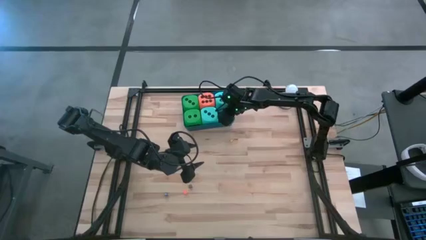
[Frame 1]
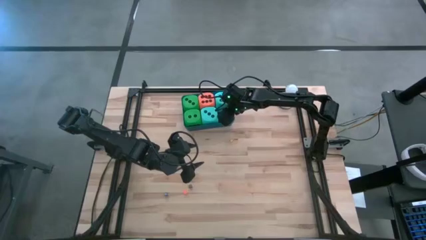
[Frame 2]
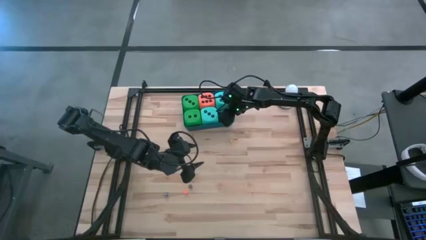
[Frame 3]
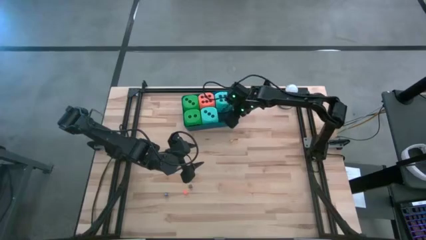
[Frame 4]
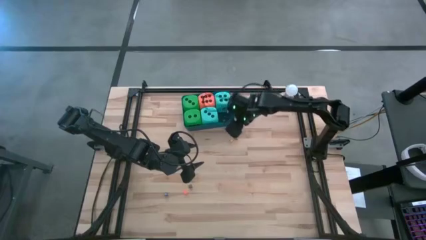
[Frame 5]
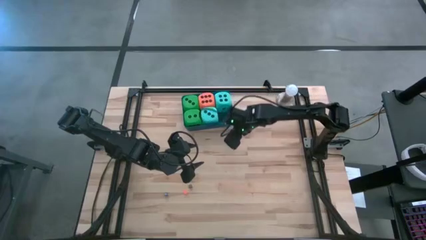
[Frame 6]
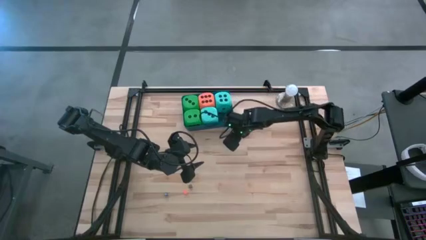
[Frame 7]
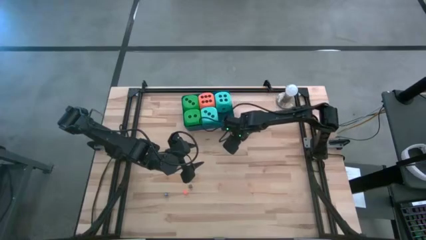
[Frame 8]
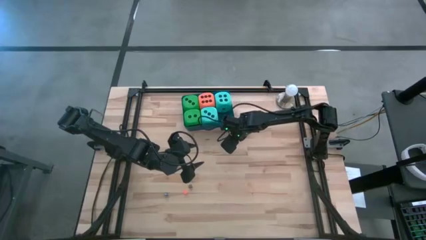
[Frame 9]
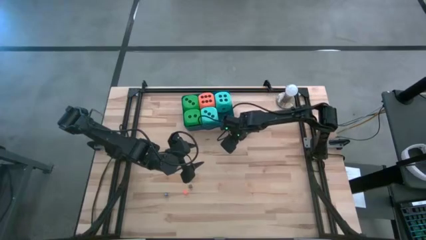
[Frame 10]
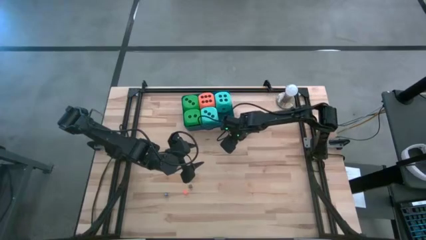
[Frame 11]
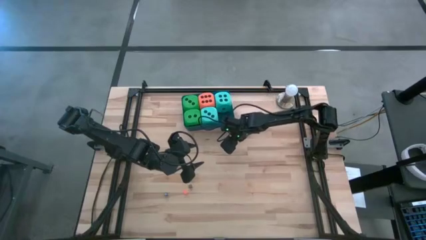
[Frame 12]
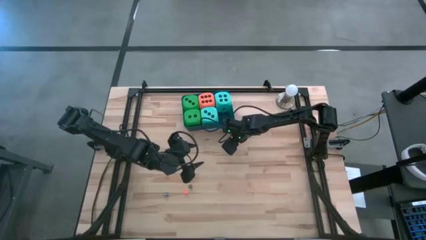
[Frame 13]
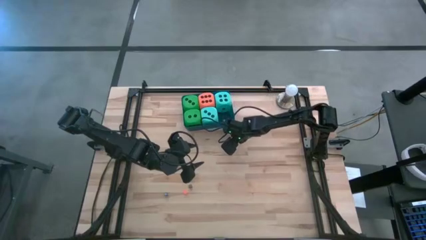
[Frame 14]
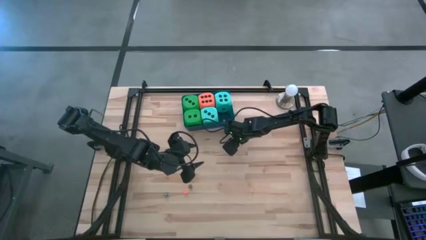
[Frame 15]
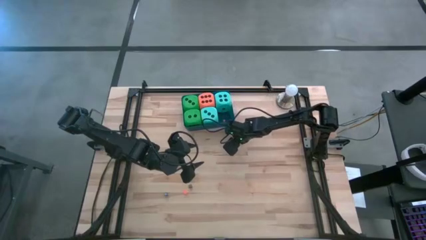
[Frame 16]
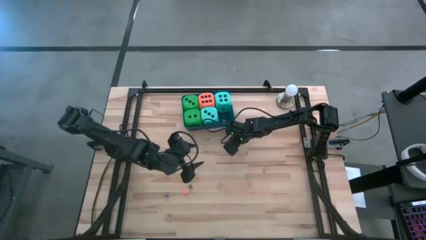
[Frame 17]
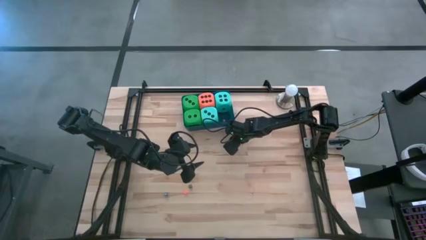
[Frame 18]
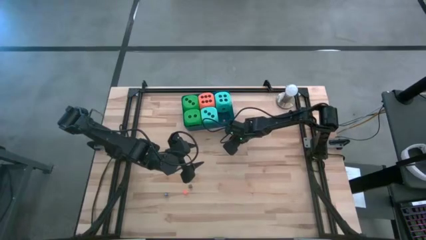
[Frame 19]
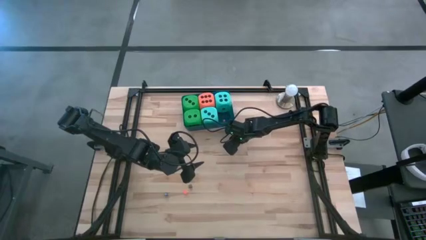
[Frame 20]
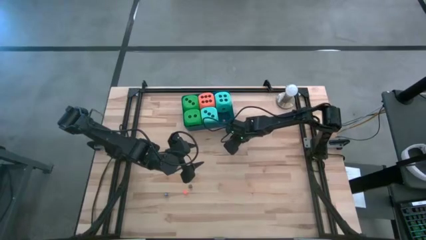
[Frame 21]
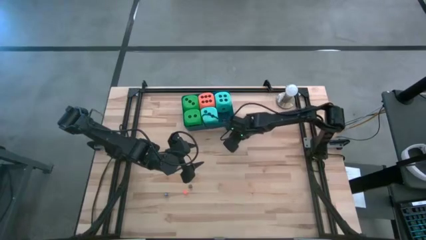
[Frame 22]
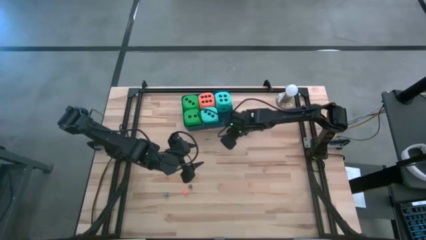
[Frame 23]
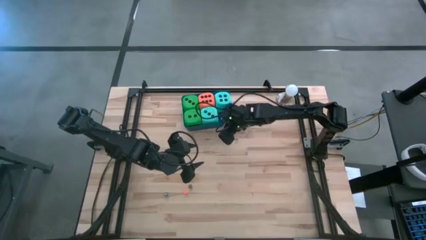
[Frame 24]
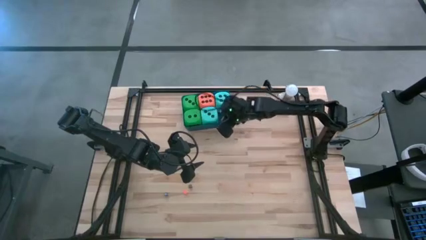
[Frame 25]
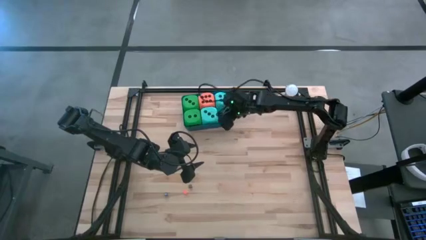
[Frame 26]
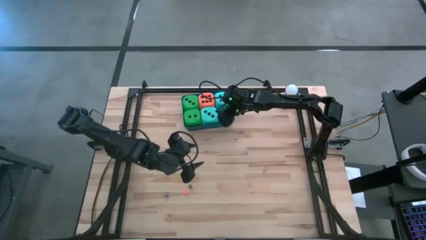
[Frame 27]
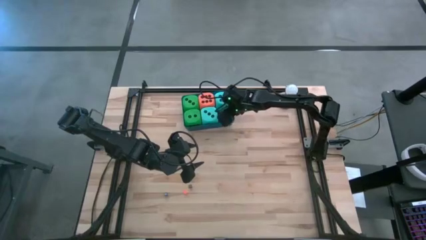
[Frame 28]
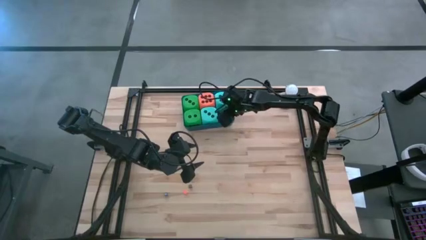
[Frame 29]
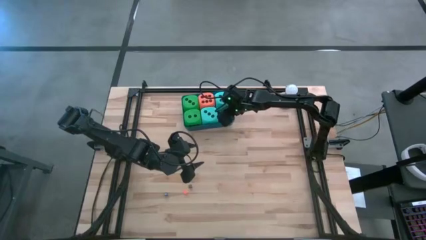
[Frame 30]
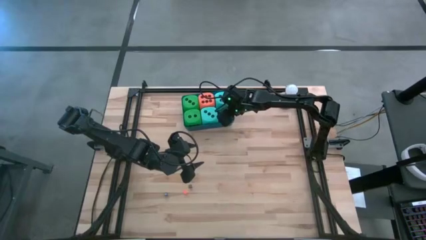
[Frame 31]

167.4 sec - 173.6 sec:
Task: Pick & Place Dice
Put the small yellow dice into the blue bin

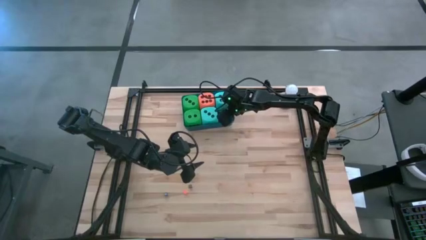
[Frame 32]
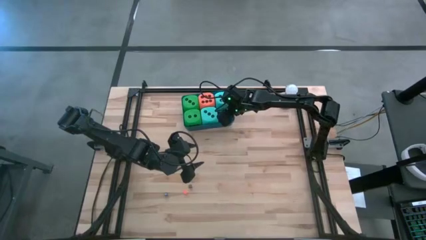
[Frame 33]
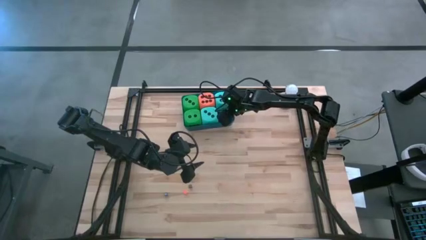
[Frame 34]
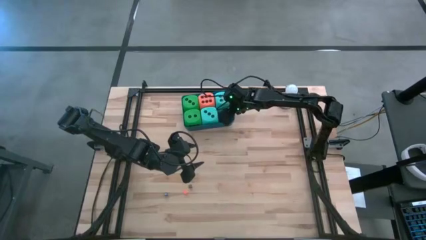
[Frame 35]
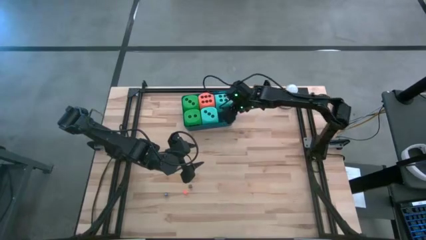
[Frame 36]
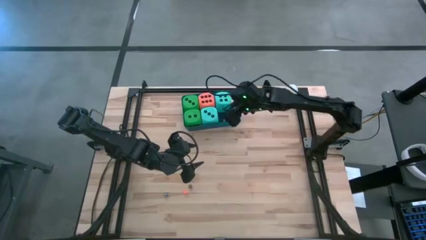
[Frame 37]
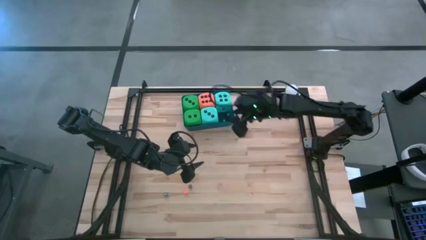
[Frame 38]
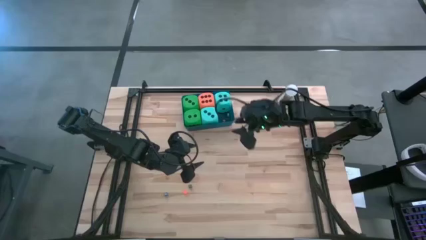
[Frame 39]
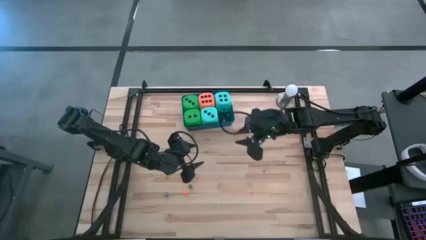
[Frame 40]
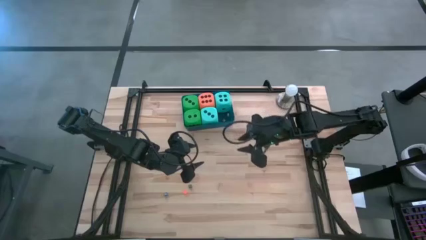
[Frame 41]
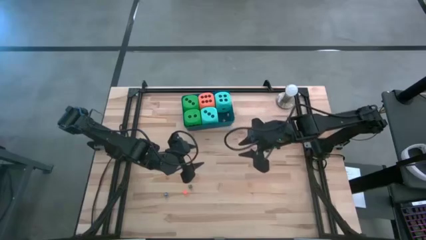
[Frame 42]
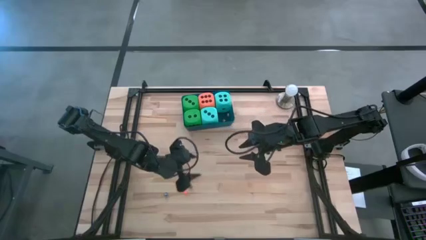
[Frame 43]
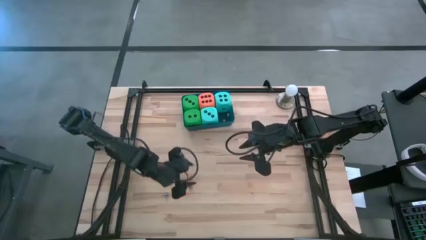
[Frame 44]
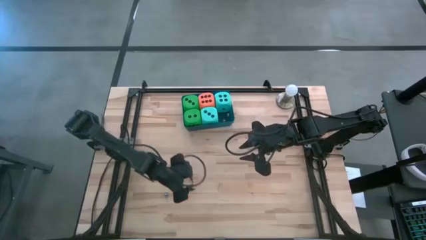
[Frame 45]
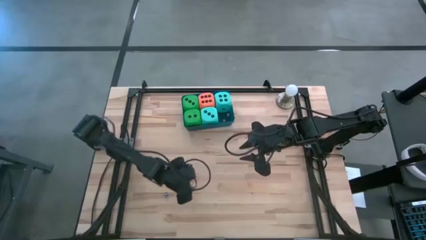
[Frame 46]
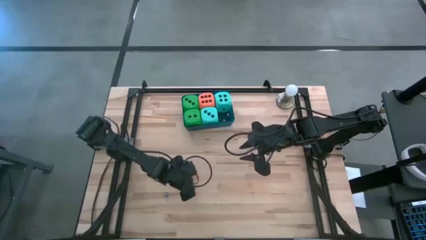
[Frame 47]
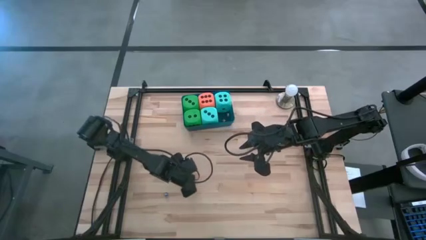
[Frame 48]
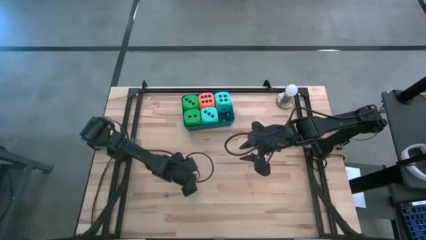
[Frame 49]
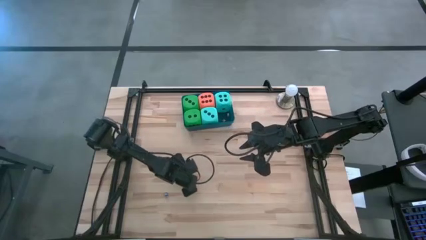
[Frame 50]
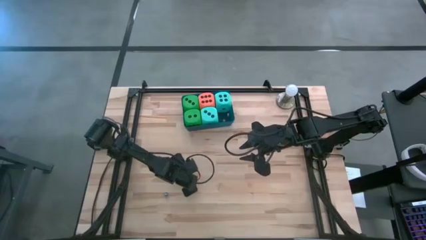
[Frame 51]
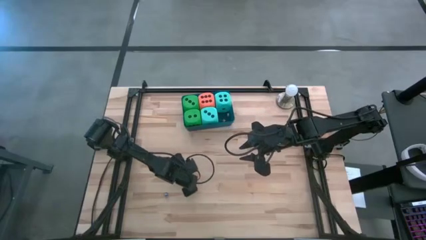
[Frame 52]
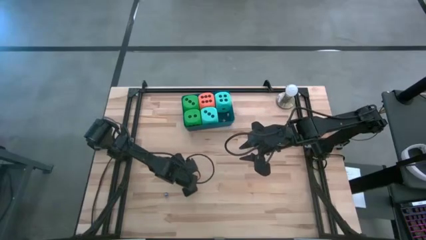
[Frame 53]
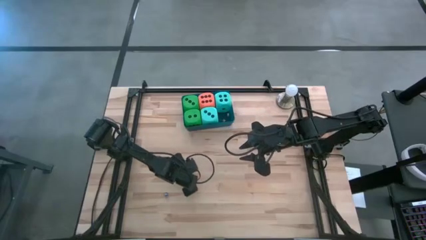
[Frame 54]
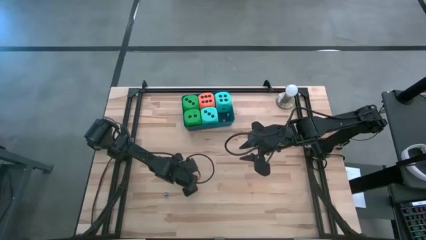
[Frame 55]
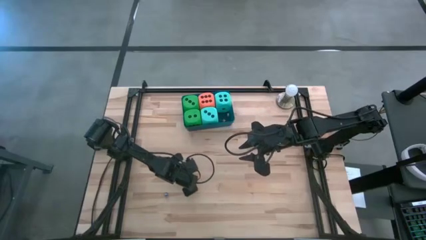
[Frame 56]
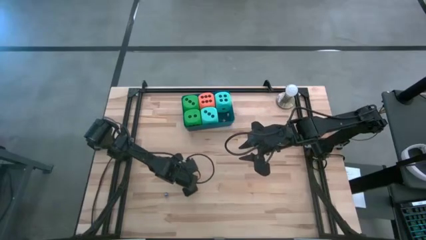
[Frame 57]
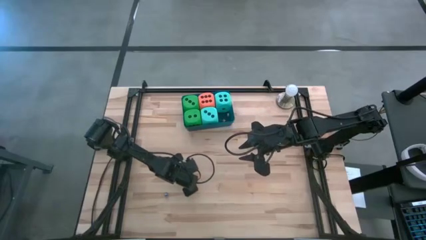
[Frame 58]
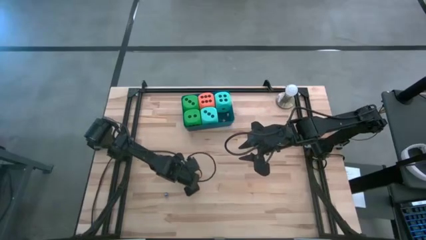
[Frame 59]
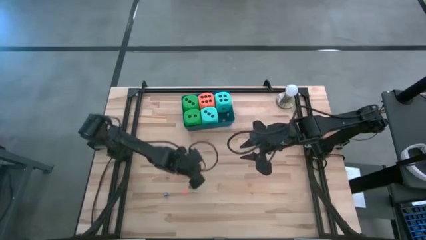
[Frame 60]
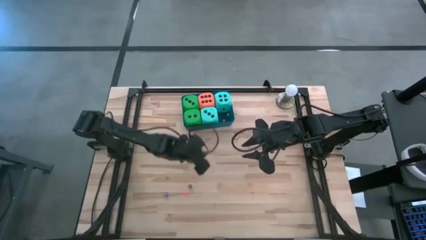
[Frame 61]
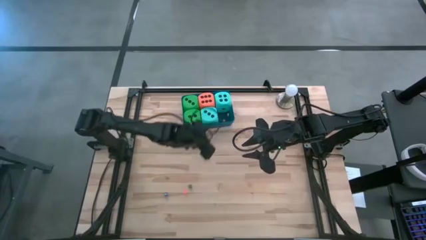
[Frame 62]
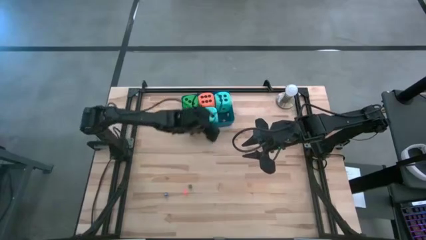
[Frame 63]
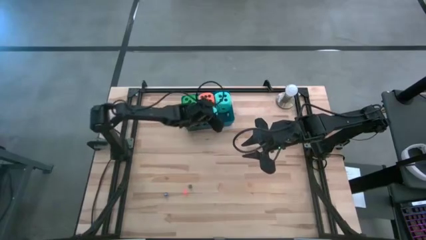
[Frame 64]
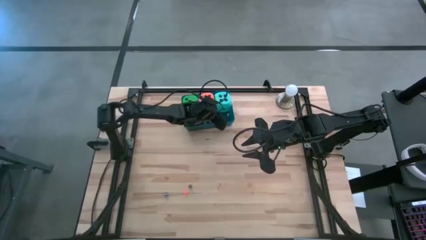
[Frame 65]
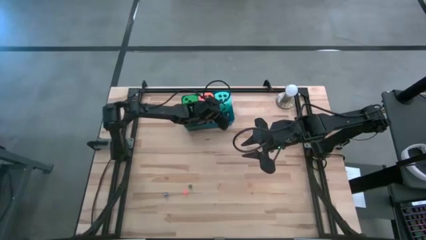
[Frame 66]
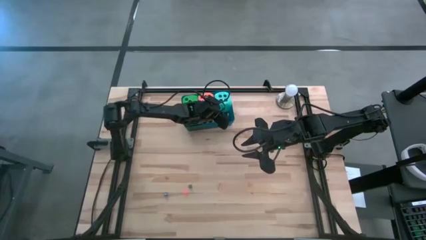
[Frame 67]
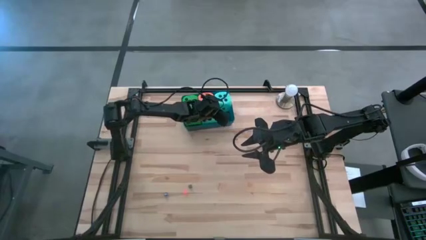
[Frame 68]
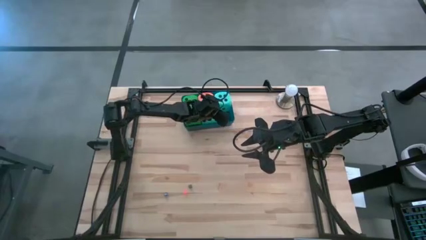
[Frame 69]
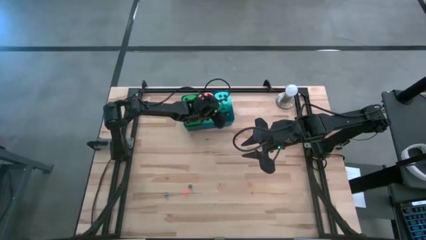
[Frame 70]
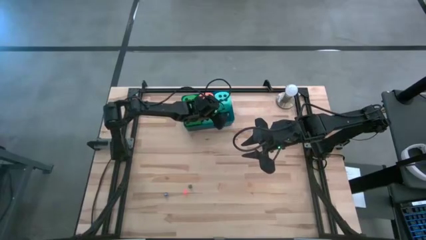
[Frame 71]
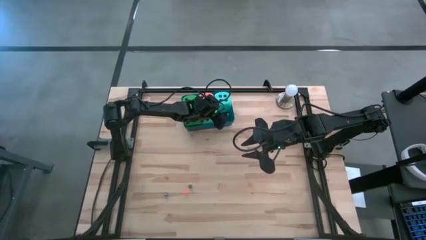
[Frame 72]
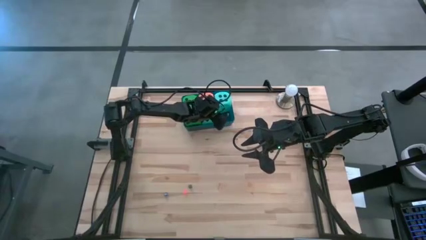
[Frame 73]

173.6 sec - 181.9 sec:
Put the small top blue dice into the blue bin
